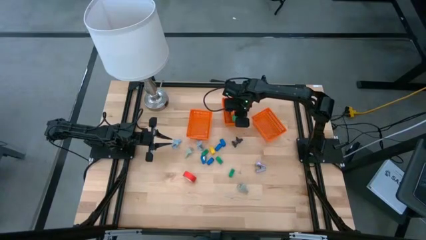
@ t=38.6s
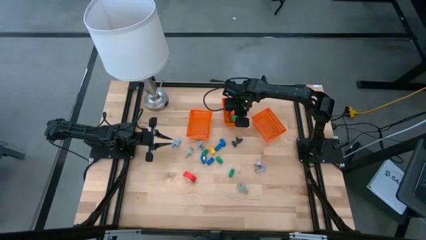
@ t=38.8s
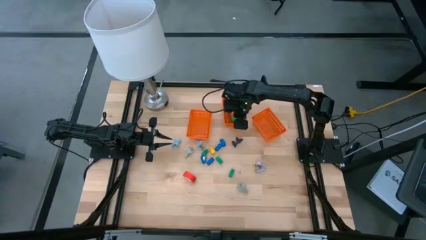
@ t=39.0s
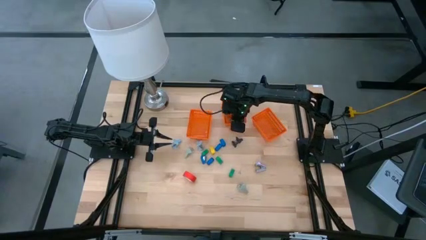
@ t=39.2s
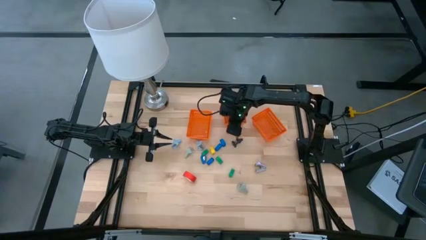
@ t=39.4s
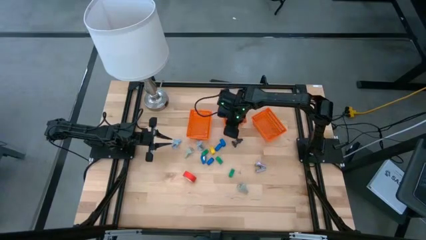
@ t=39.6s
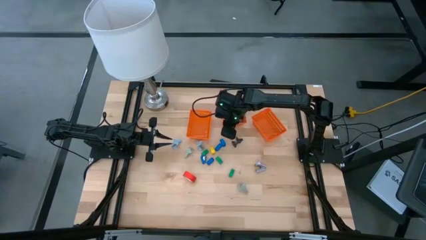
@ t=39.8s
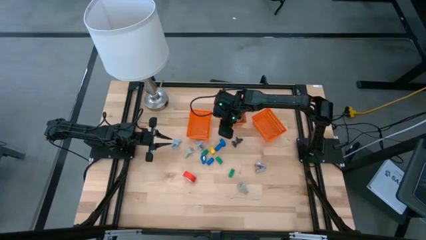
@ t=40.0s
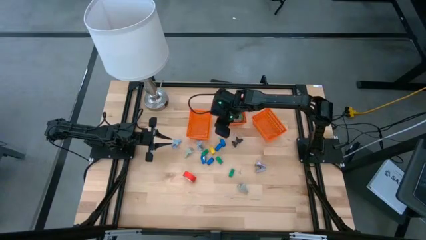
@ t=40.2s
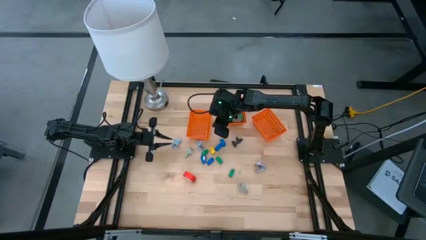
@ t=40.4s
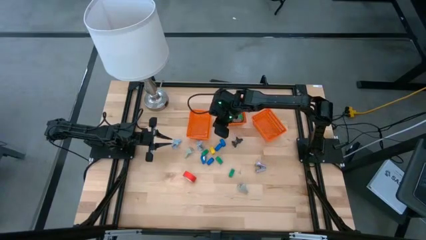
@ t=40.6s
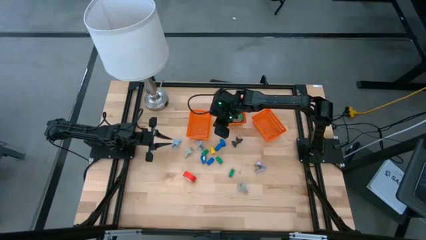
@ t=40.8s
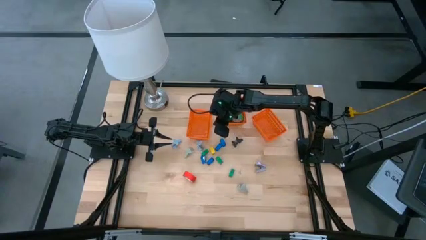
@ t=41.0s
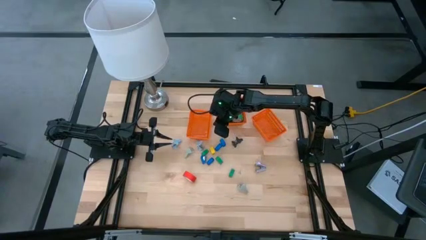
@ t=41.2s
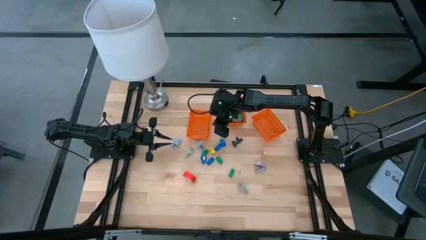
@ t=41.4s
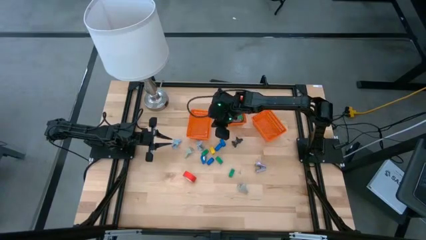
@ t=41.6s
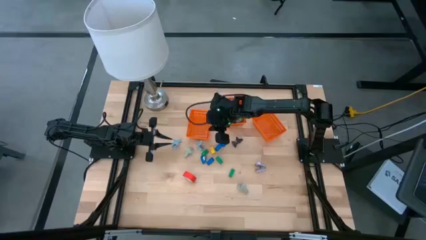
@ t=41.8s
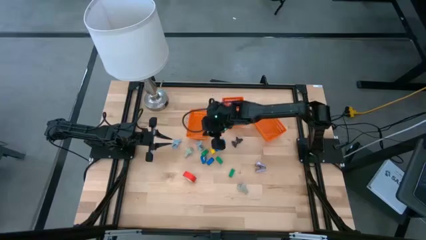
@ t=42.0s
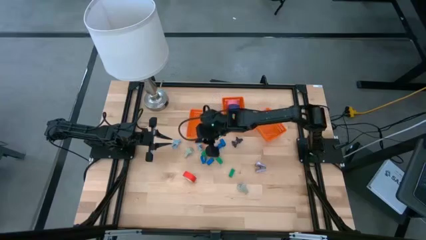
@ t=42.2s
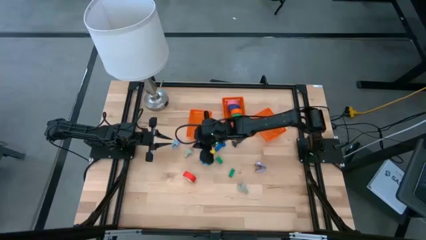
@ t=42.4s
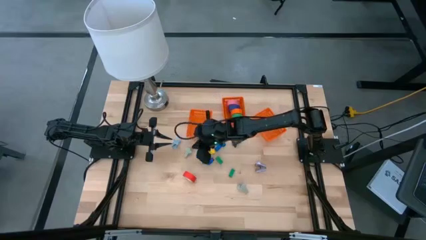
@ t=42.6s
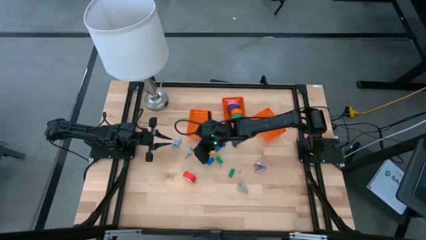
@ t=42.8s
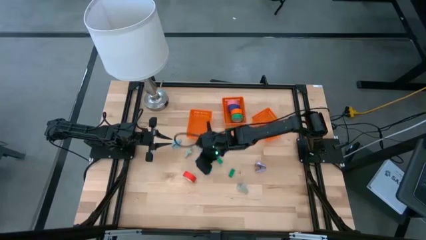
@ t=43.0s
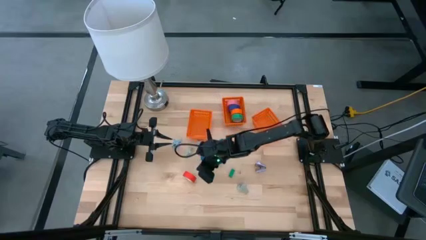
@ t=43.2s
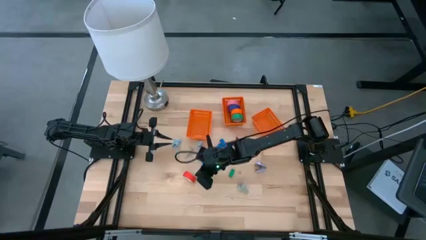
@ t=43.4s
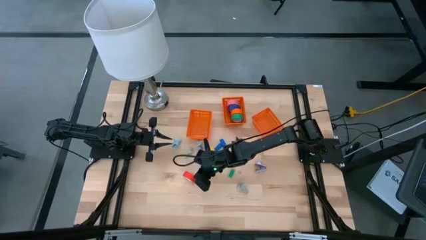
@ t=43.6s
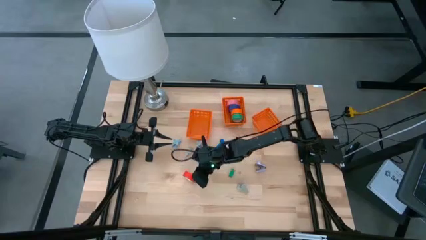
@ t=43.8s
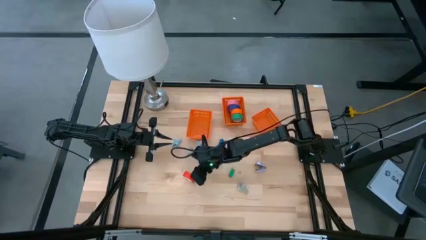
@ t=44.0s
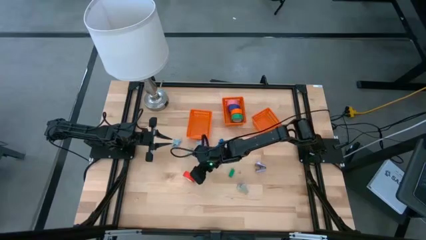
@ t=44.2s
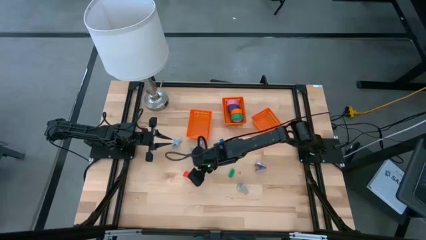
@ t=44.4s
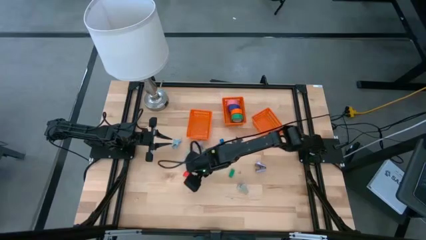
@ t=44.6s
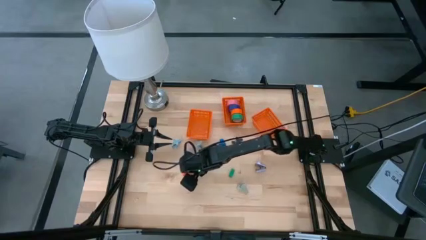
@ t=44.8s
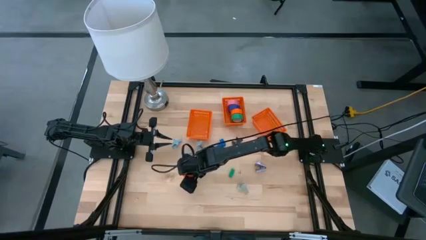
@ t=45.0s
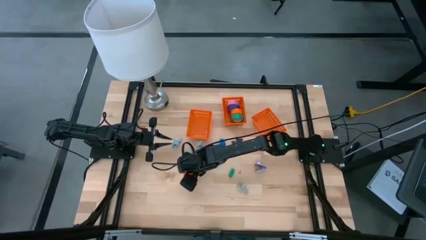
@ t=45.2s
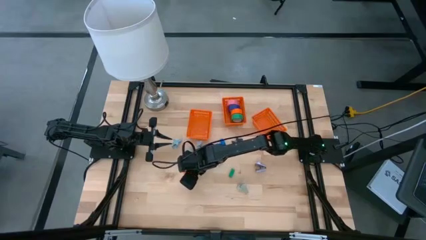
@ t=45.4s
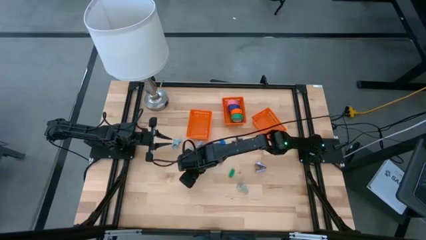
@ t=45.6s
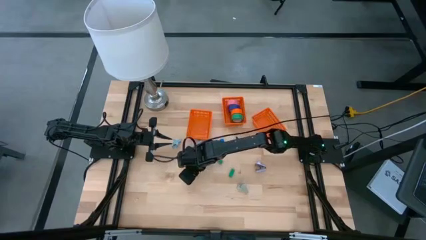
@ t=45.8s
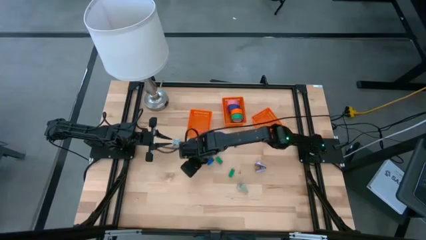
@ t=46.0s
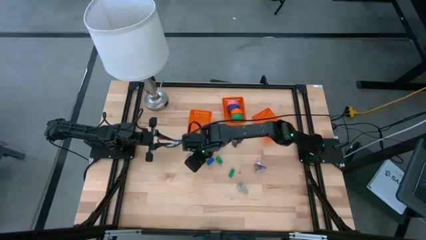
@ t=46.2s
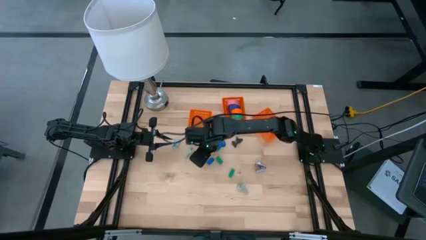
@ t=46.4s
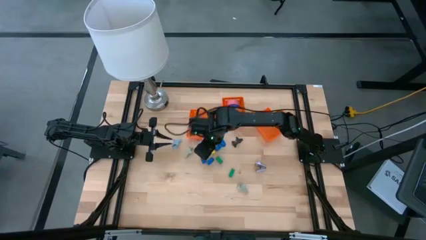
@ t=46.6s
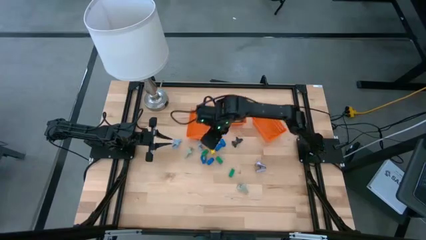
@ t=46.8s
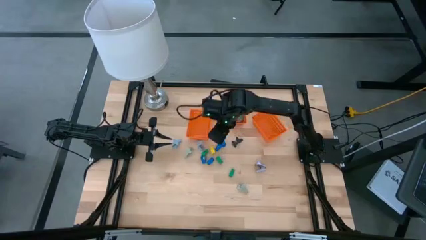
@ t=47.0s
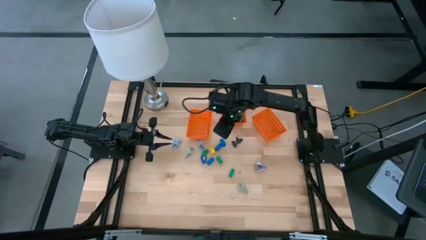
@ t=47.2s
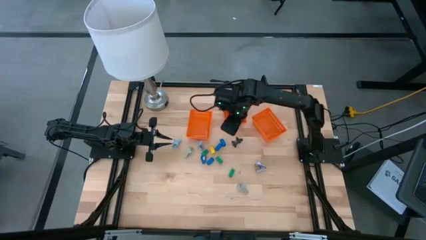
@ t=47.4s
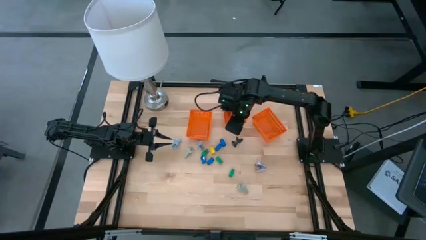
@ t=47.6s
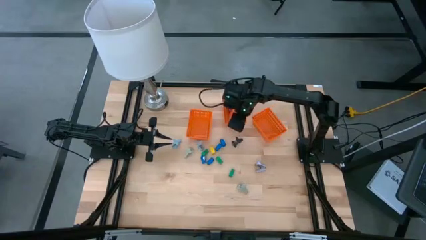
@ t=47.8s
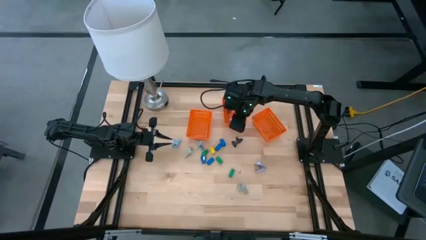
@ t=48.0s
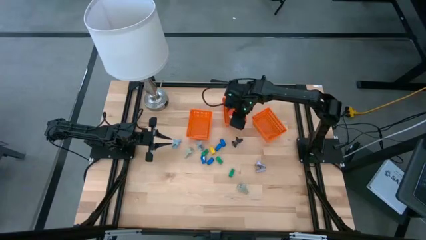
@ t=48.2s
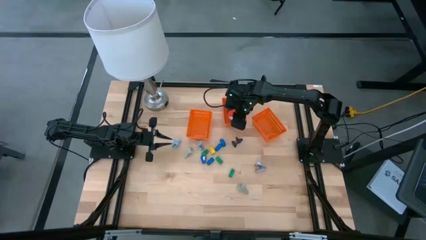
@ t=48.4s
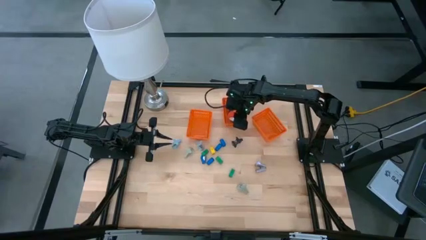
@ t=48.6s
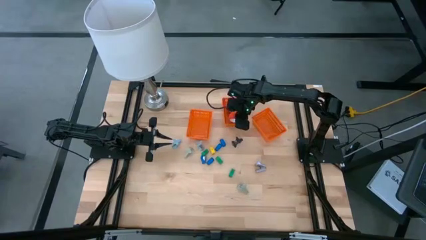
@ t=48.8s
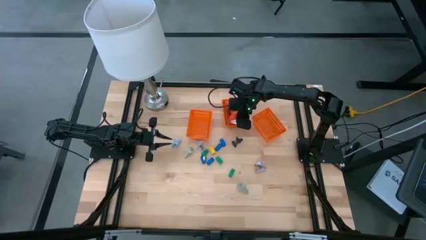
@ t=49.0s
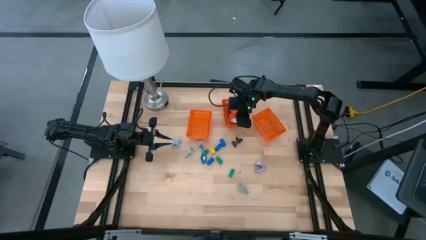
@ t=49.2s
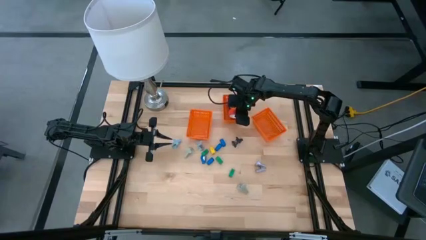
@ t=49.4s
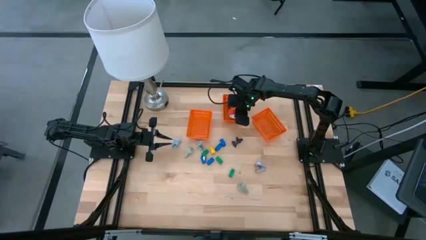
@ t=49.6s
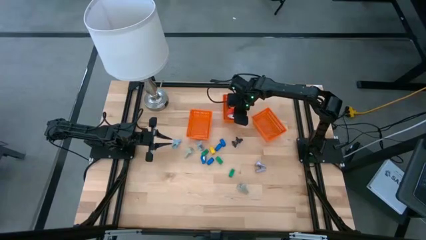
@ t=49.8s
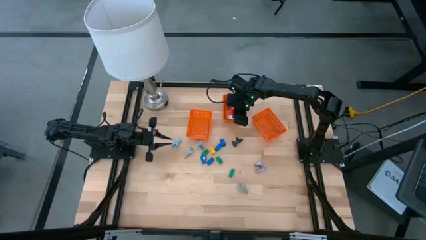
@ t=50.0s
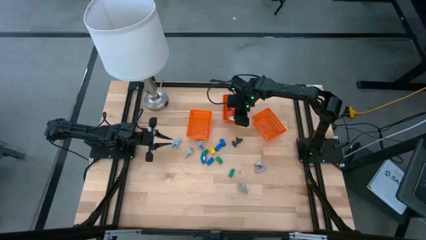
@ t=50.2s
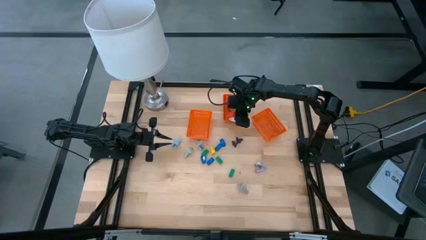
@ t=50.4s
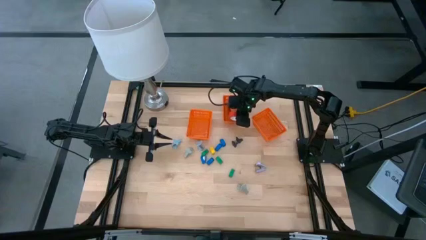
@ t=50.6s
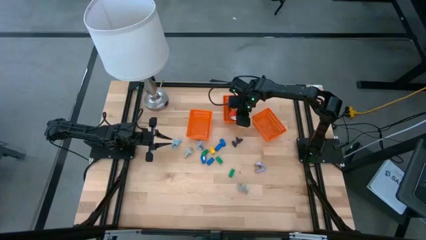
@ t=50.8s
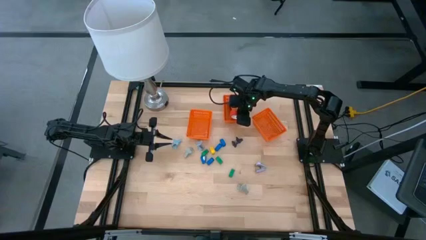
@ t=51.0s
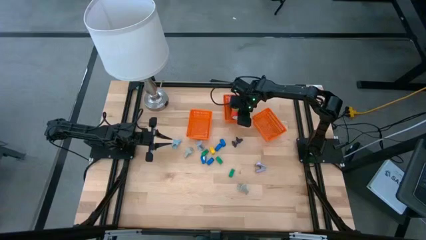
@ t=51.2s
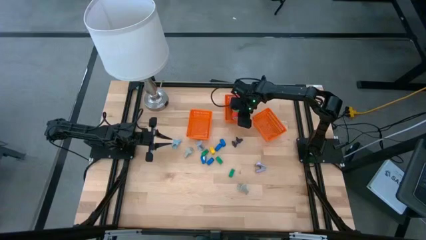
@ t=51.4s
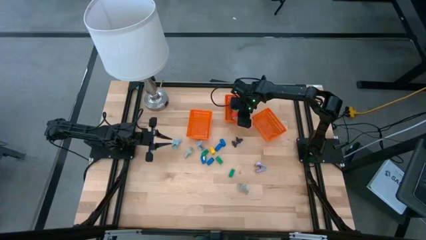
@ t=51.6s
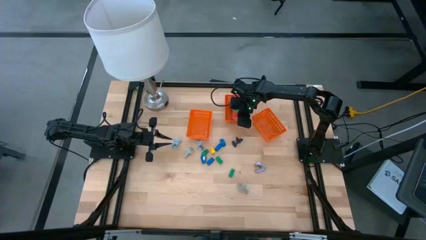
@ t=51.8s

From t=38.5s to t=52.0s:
Task: Pick and place Stapler, Stapler remover, tape
Put the red adhesive tape into the middle orange bin
